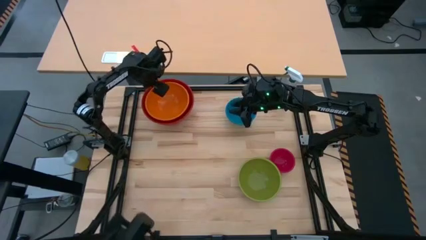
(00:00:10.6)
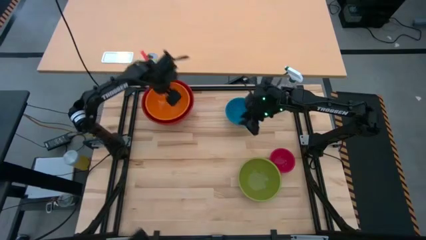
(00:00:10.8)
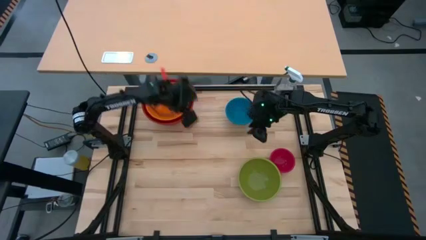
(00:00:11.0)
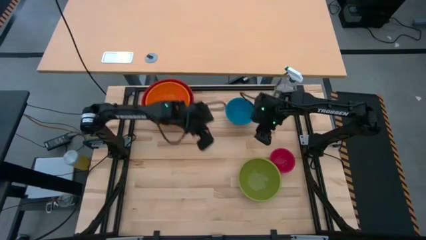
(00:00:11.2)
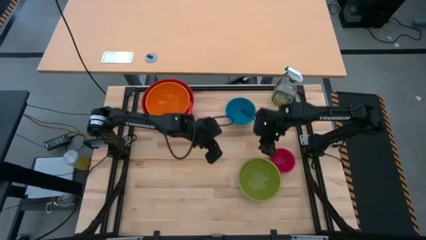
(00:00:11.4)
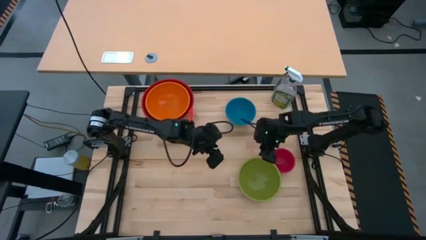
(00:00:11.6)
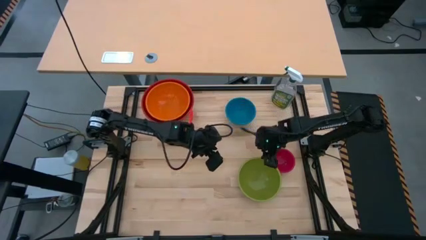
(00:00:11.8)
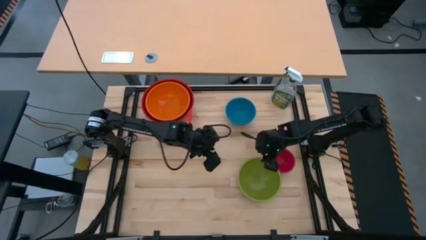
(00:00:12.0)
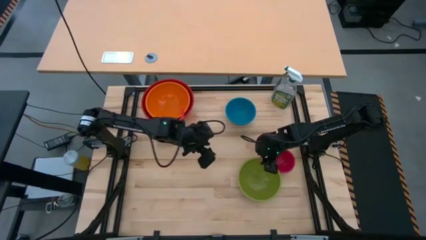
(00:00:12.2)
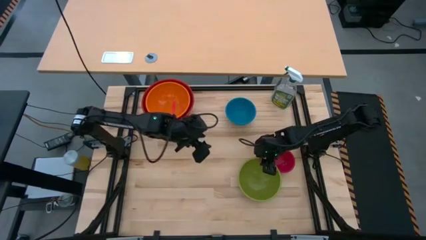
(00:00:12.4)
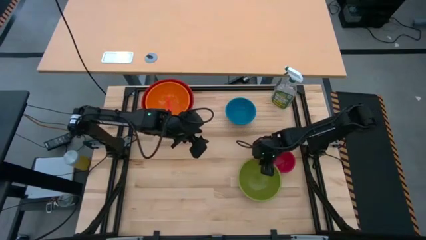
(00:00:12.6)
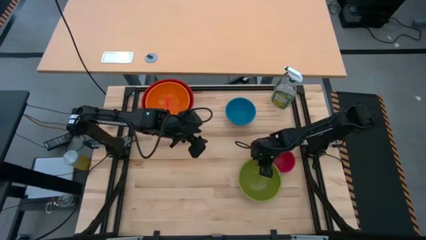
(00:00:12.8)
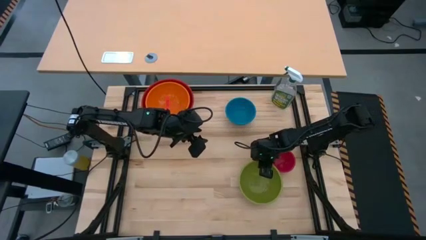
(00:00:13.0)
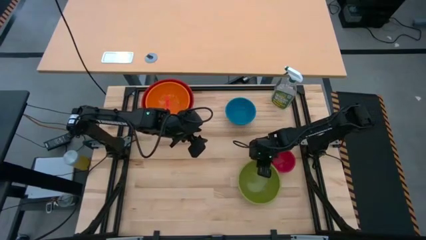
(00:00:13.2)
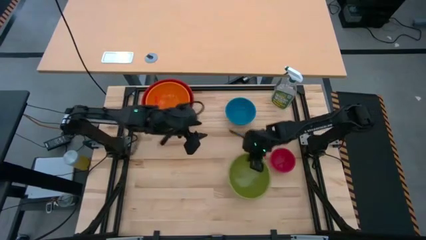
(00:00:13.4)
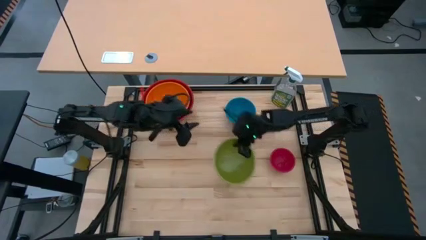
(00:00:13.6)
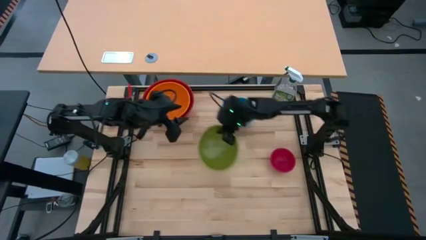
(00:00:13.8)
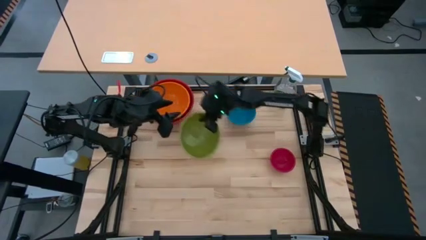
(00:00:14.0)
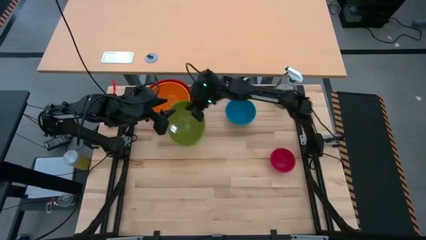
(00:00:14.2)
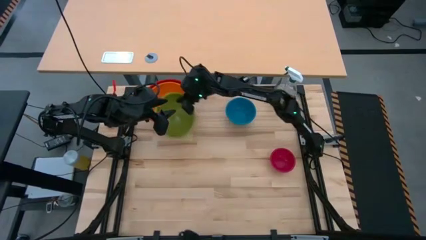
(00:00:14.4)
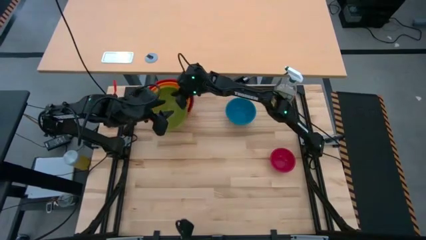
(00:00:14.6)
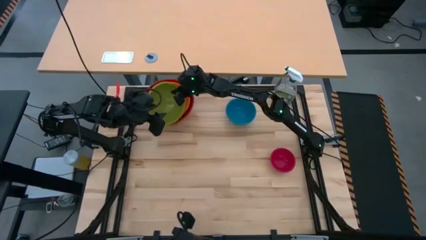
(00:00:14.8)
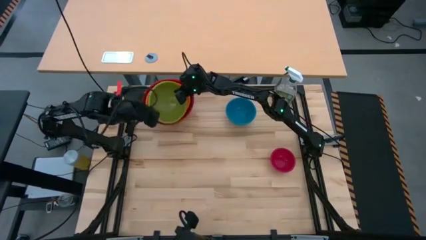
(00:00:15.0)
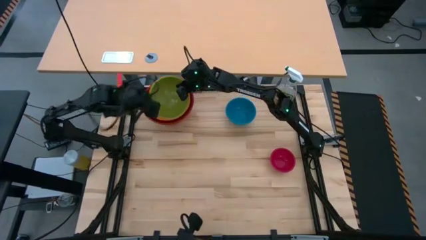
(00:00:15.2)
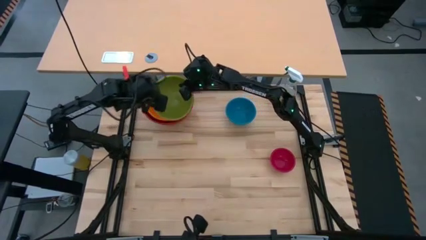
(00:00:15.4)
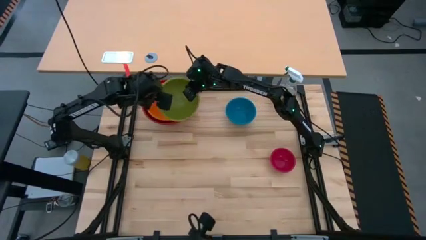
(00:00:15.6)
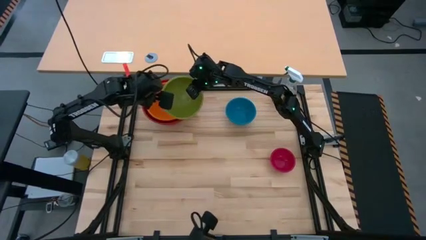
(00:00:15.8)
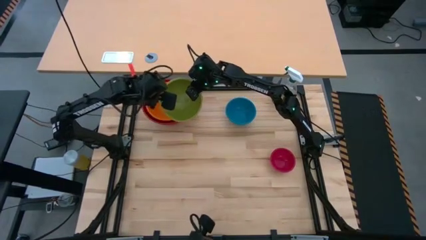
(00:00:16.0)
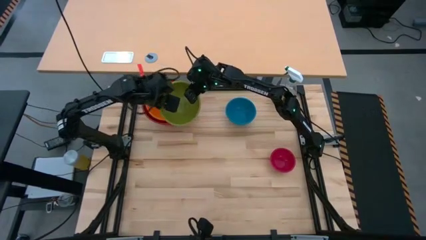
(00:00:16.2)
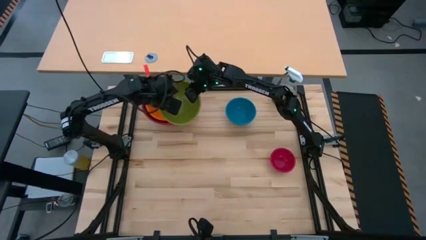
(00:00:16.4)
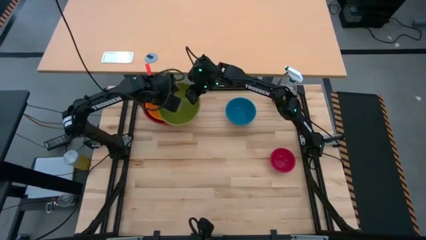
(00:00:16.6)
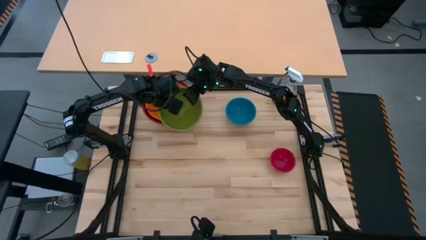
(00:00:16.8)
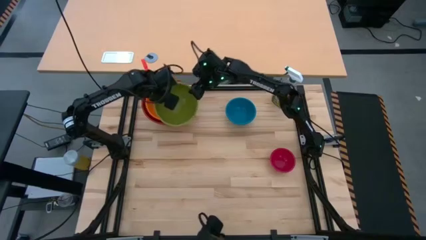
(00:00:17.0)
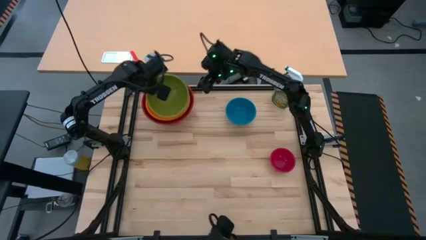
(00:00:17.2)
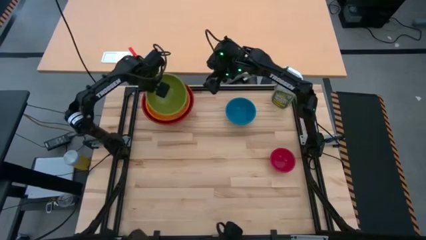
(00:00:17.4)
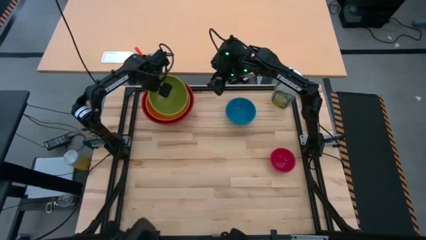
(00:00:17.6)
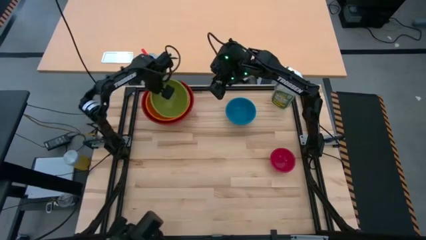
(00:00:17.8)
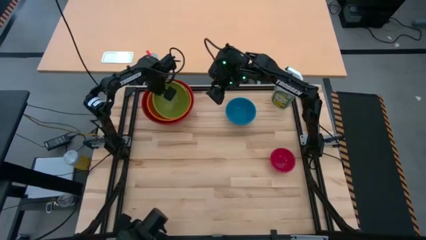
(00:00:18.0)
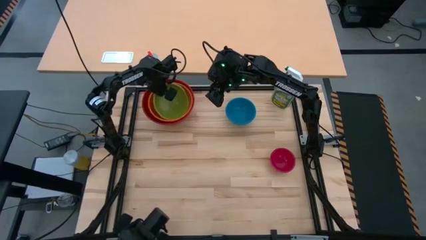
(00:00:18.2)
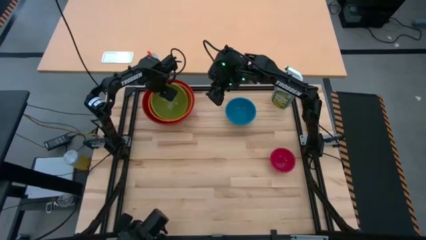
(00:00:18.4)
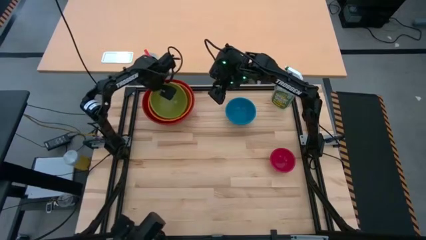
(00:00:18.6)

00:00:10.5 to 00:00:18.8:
Stack the green bowl on top of the orange bowl

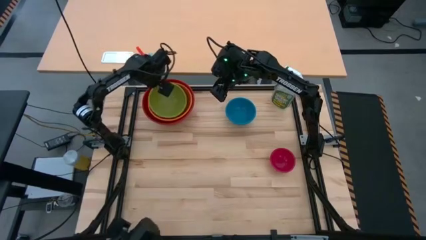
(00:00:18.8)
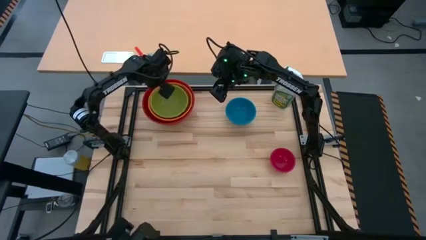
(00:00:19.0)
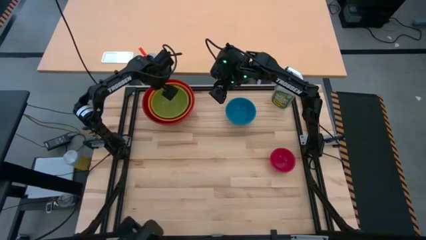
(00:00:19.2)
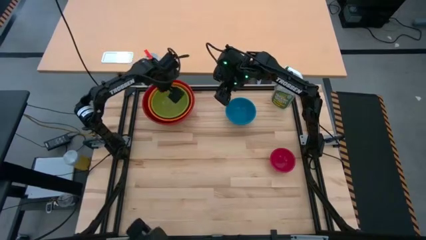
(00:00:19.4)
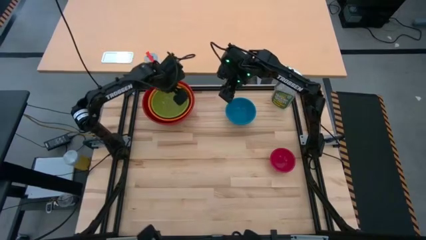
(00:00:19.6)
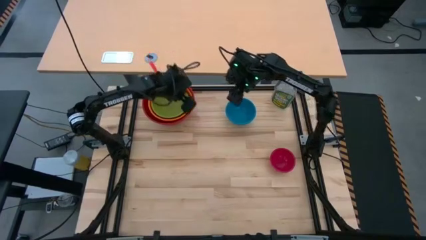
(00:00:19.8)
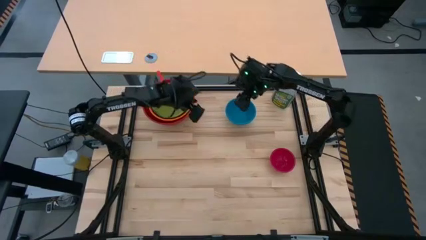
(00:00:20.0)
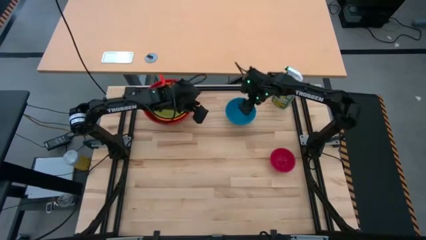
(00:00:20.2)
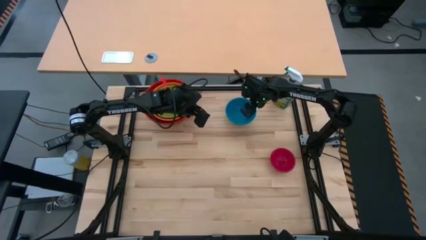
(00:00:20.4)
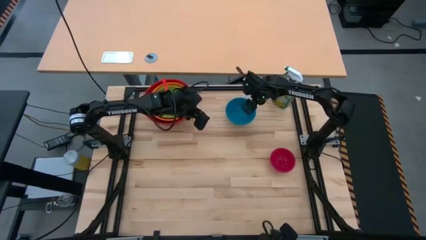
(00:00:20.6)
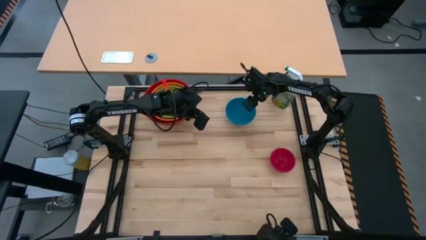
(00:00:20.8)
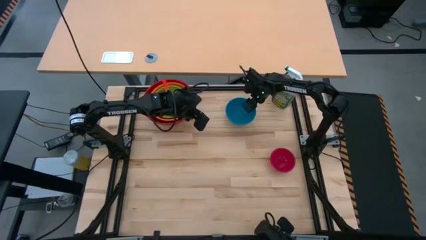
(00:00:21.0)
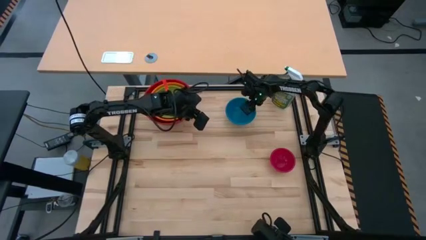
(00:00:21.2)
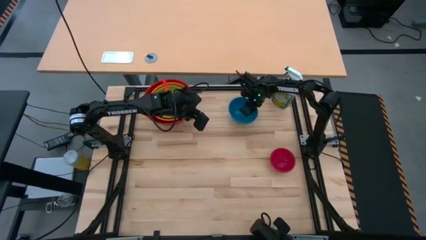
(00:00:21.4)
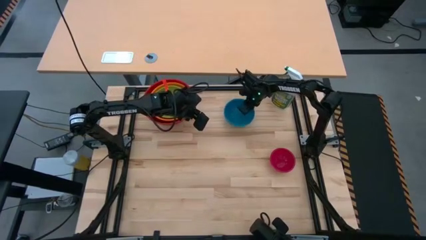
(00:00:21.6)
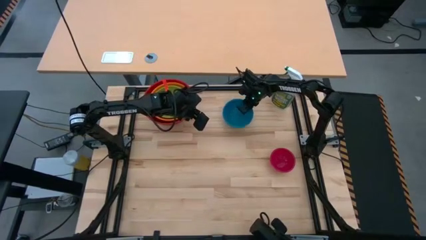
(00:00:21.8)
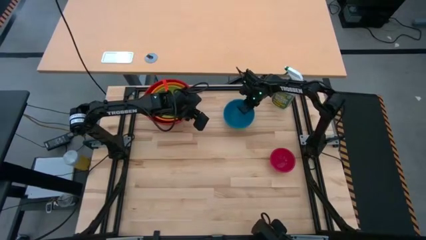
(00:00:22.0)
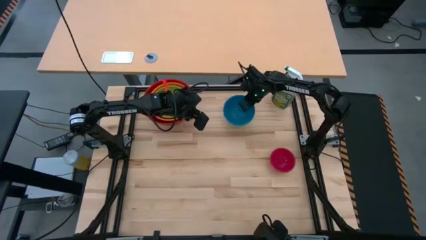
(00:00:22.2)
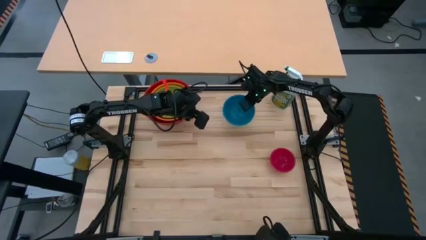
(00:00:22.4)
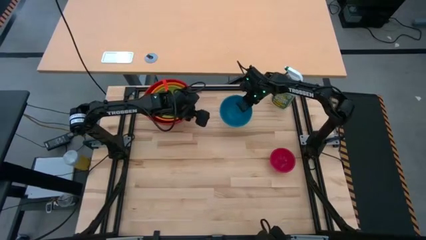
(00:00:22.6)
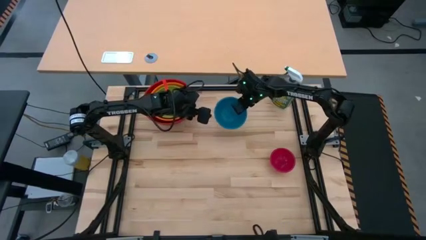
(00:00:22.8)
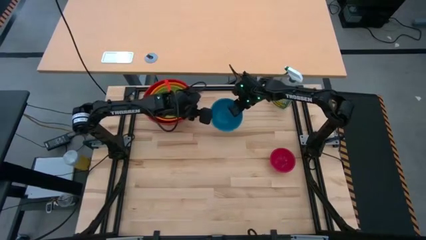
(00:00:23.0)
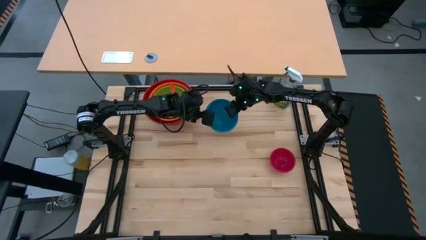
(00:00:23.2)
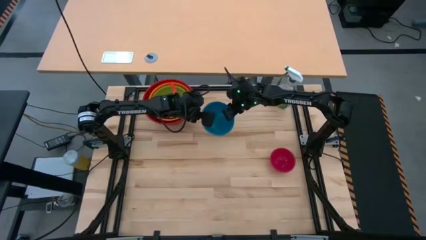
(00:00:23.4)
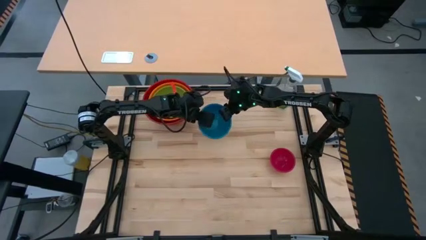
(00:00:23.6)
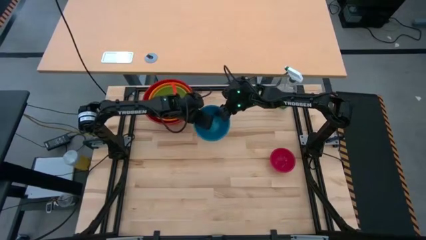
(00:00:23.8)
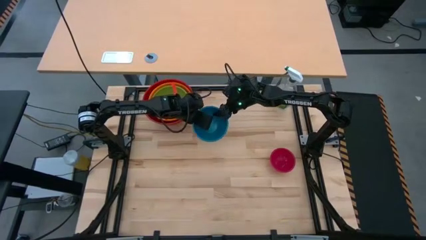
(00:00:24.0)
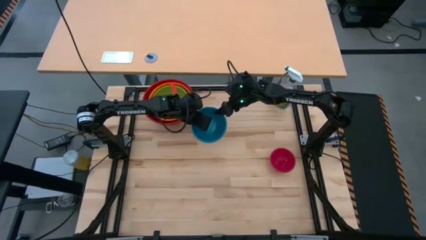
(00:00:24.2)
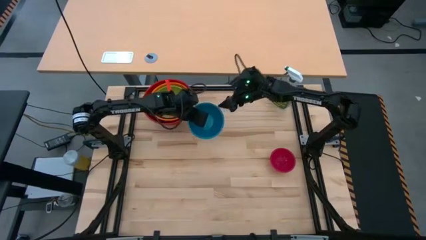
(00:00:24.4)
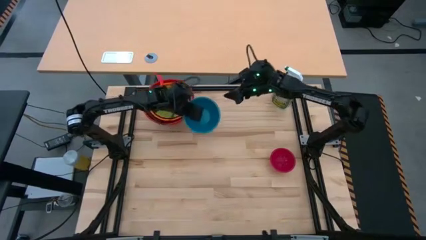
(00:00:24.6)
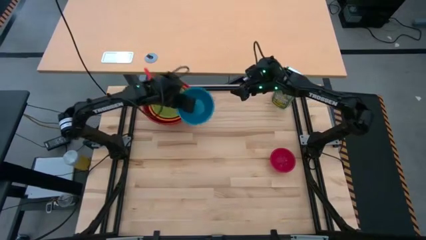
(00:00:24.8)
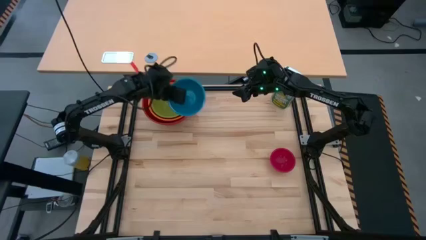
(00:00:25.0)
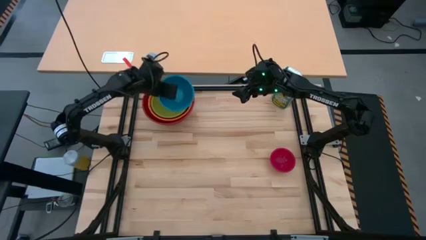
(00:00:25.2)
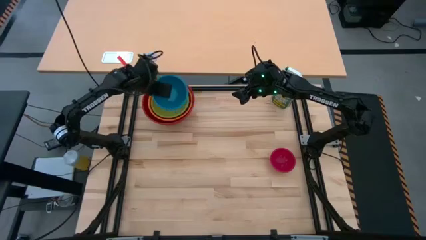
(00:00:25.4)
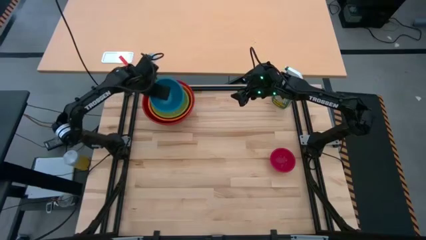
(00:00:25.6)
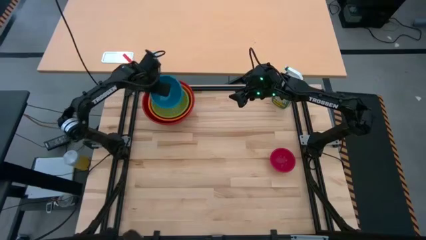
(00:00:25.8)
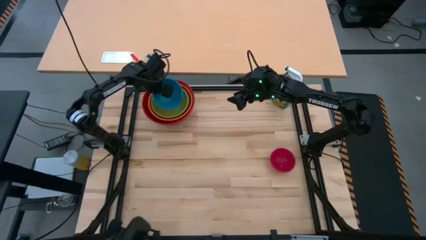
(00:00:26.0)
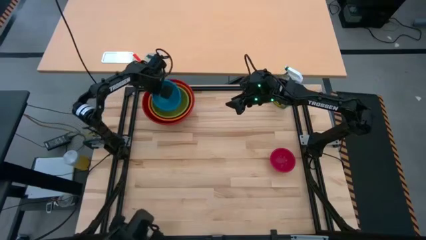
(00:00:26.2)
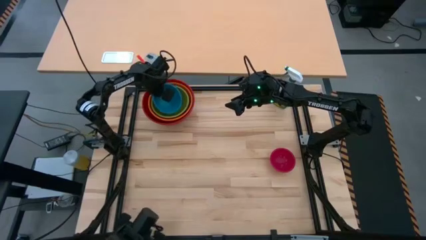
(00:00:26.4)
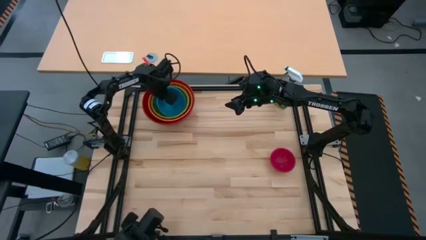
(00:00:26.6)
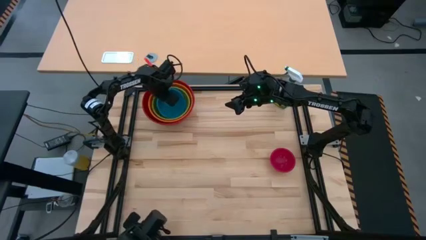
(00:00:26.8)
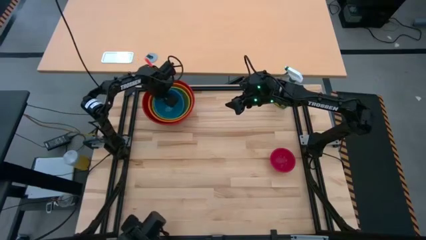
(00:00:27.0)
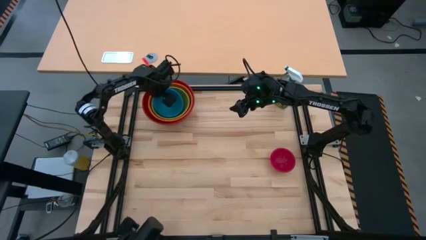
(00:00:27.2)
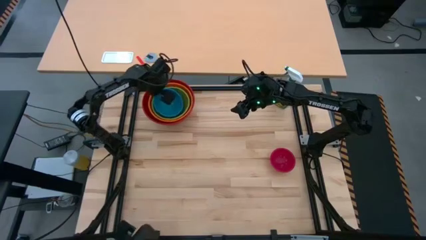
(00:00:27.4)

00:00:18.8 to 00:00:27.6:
Stack the blue bowl on top of the green bowl
